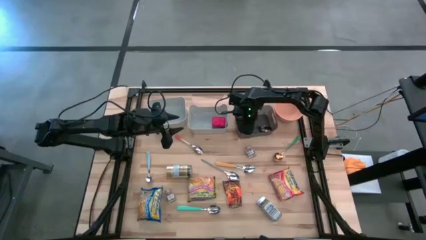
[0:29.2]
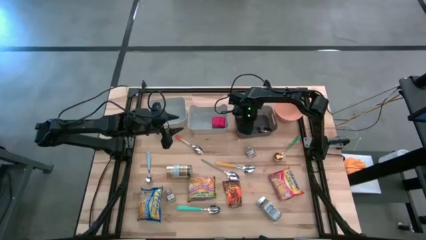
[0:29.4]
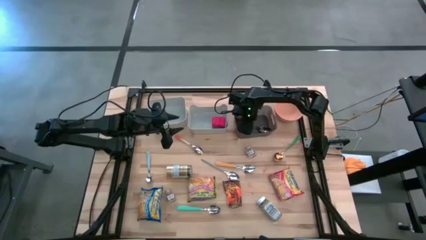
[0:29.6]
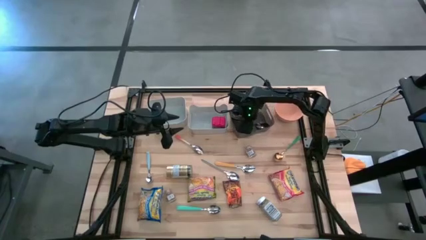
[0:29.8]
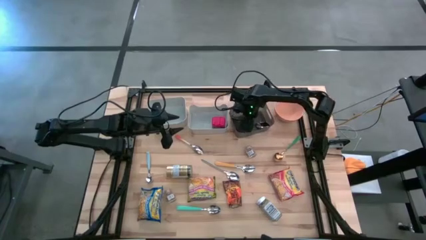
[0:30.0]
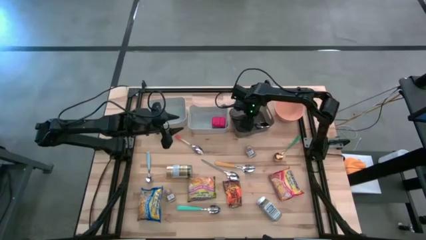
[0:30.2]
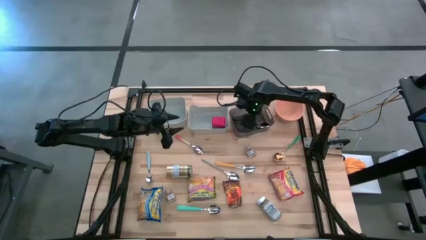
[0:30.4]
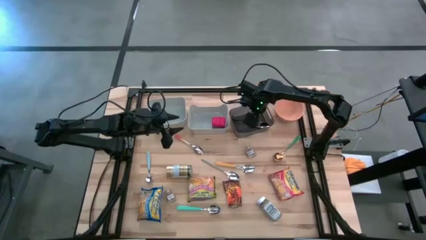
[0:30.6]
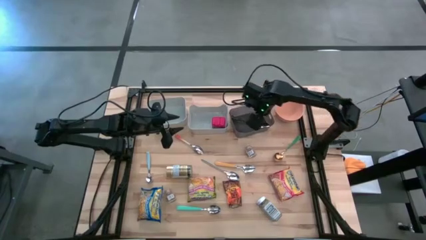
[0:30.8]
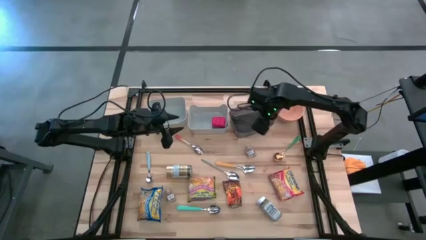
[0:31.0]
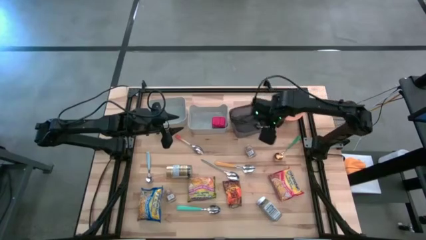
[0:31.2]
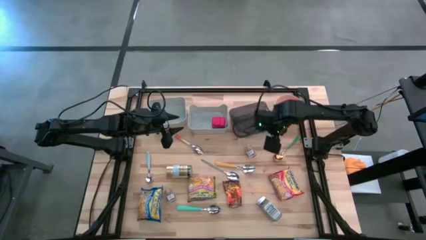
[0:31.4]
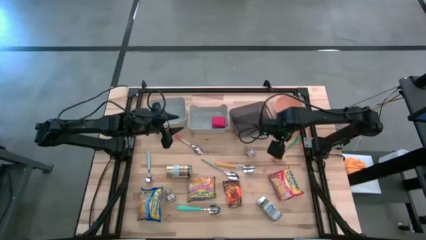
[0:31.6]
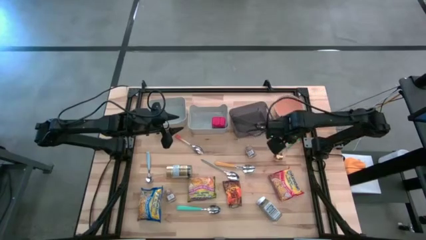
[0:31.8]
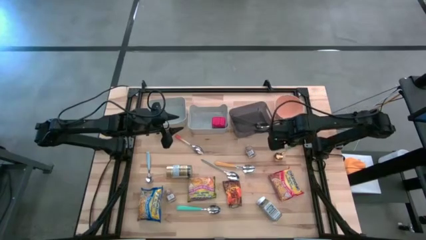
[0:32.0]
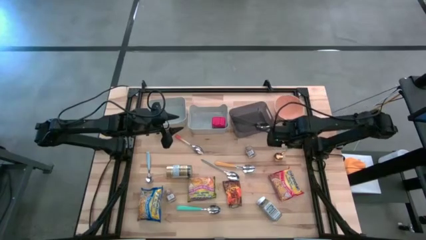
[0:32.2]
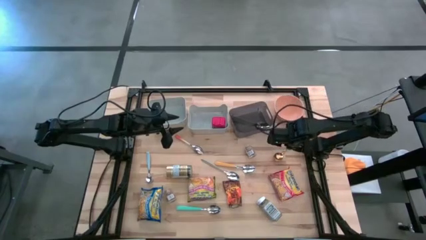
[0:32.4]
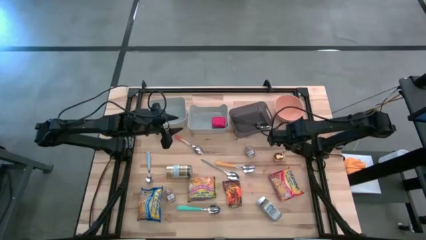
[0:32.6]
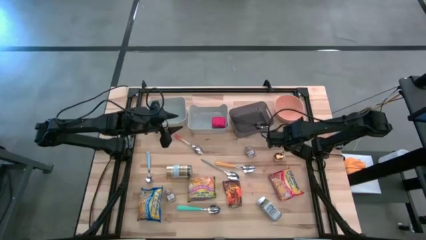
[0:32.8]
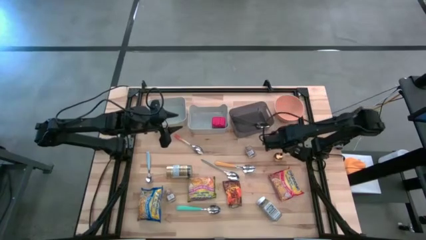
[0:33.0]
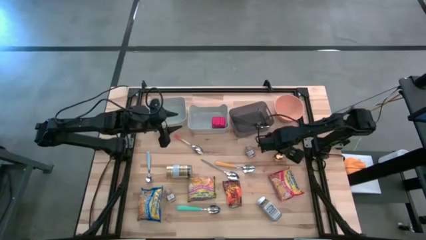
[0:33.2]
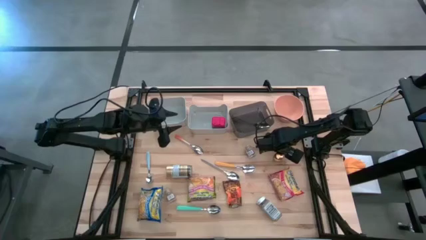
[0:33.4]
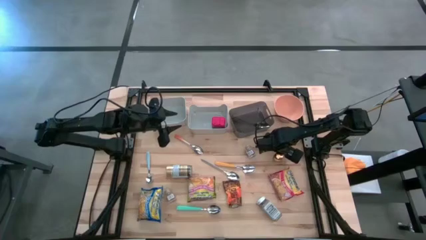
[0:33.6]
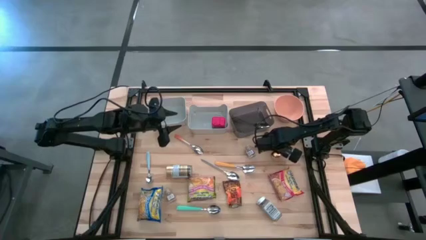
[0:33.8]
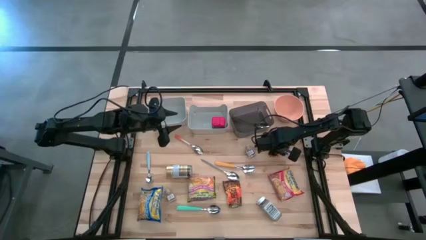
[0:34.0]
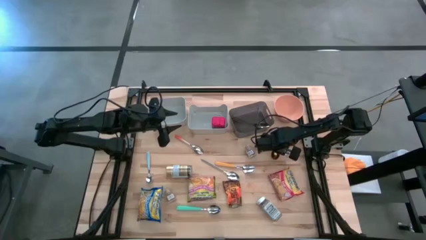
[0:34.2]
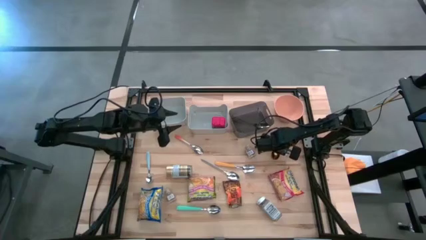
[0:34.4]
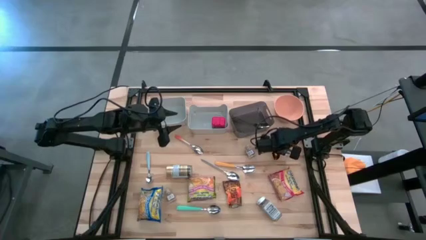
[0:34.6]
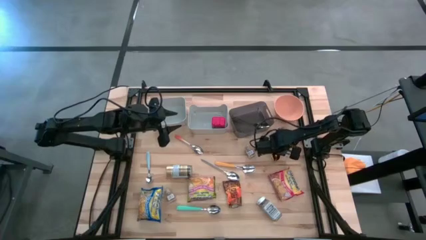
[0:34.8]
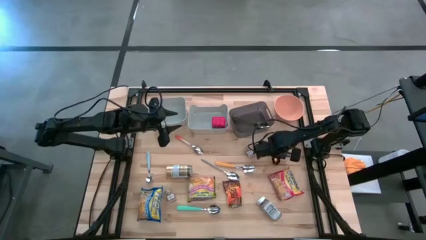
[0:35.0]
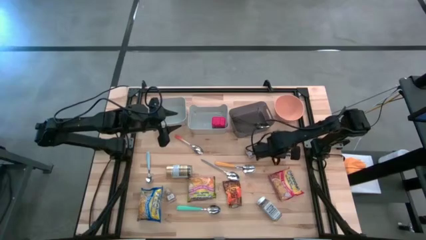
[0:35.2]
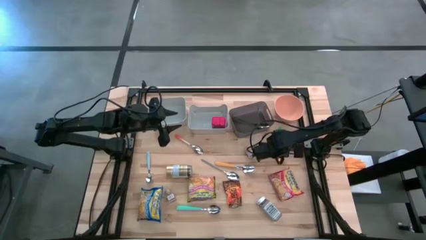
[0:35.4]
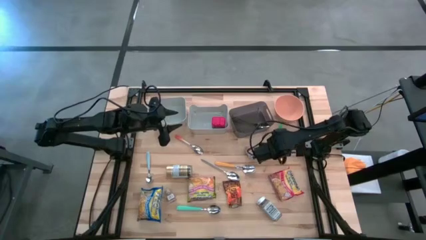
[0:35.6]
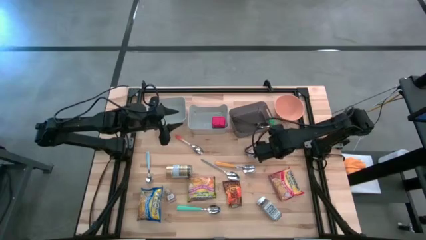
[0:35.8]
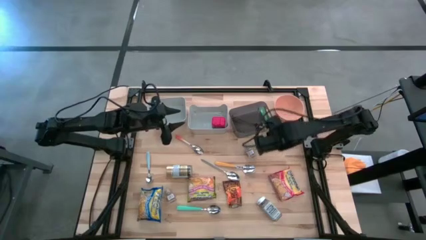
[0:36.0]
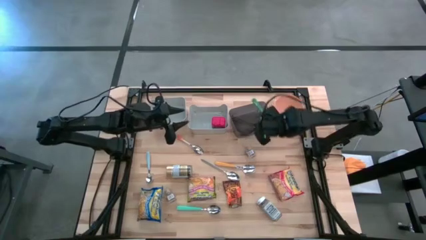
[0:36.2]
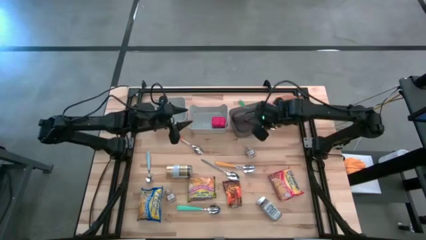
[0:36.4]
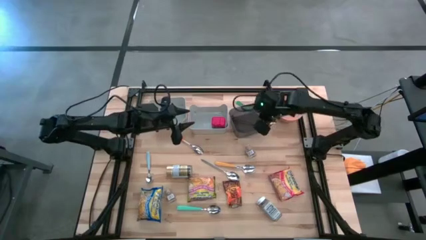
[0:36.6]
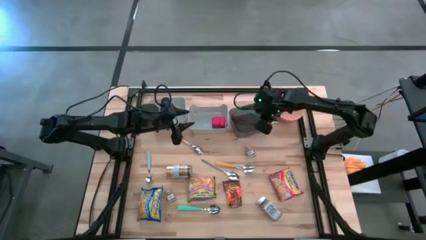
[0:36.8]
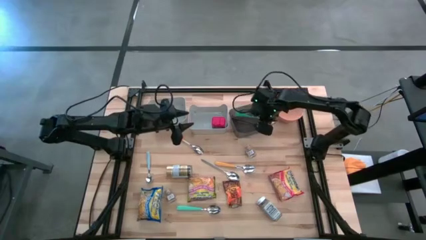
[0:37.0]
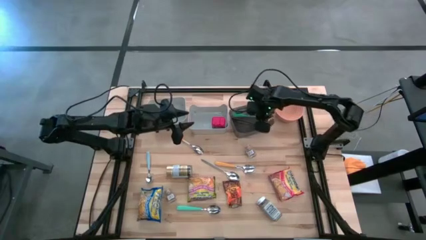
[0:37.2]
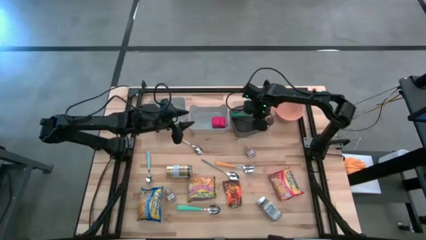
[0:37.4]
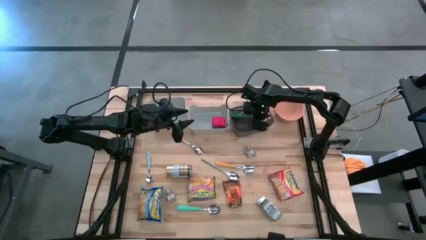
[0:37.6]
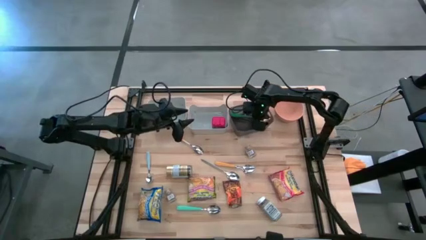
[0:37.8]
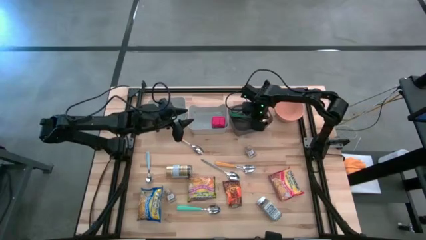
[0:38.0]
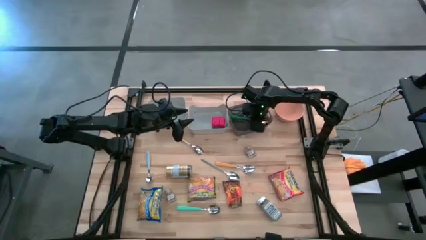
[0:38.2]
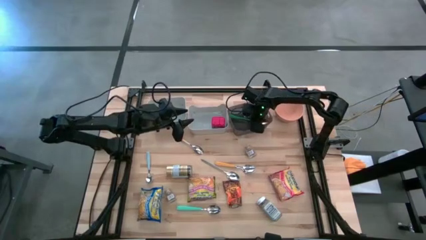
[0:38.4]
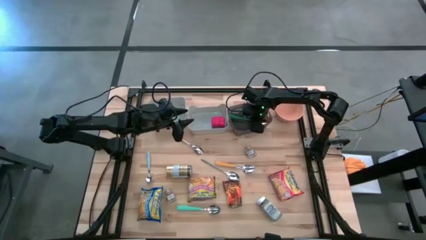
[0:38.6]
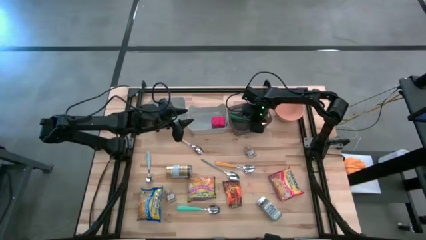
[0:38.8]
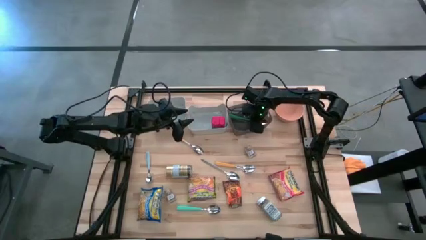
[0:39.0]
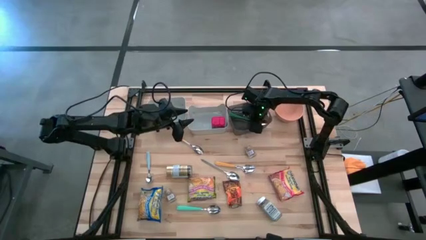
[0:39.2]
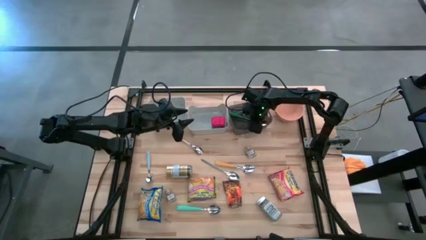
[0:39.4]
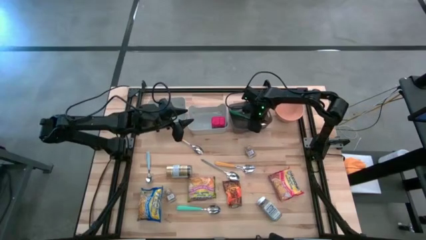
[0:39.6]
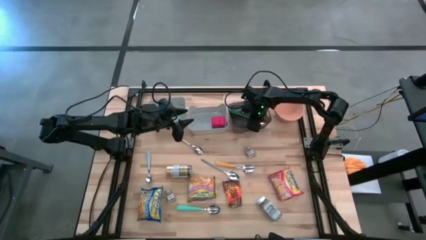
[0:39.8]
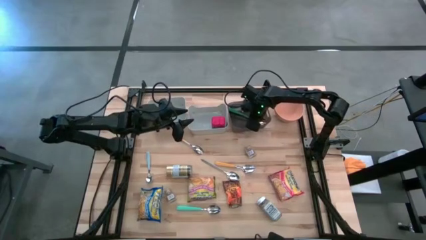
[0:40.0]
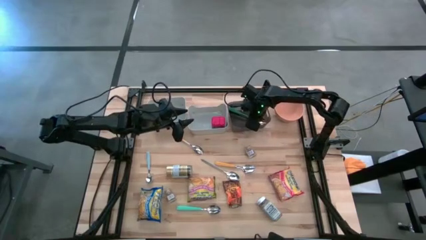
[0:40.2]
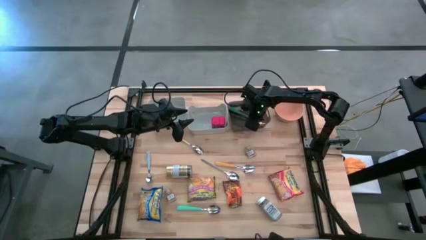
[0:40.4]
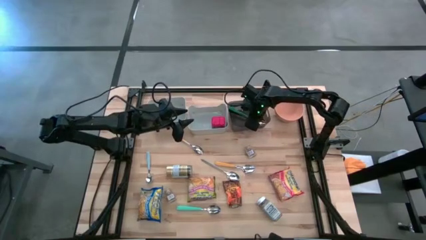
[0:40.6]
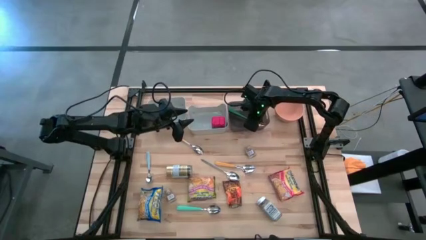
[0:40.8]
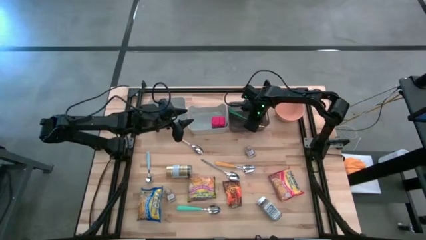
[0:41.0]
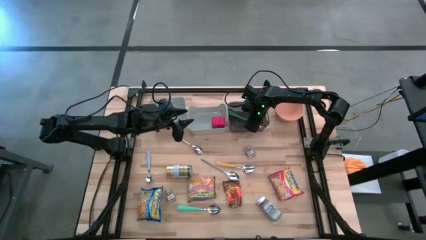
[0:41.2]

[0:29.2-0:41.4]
Put the green spoon into the black bin

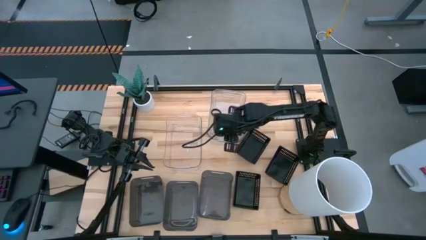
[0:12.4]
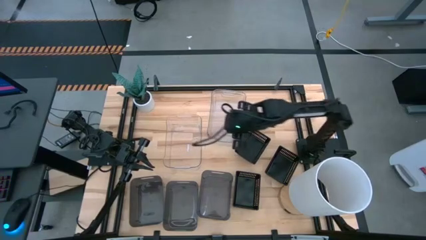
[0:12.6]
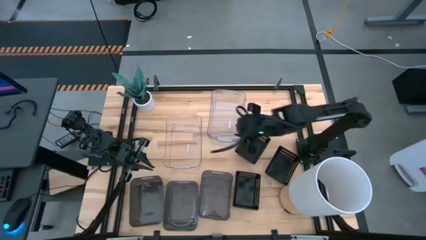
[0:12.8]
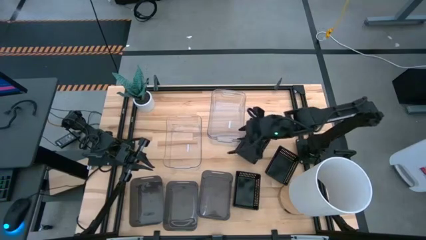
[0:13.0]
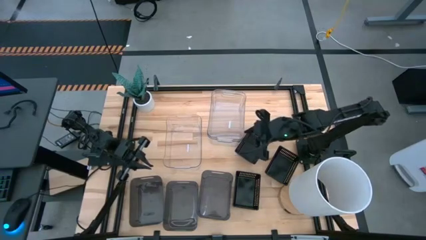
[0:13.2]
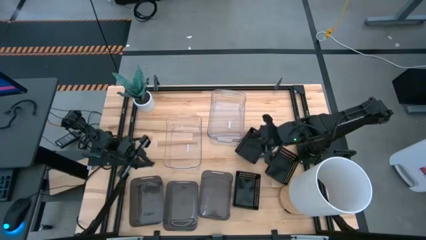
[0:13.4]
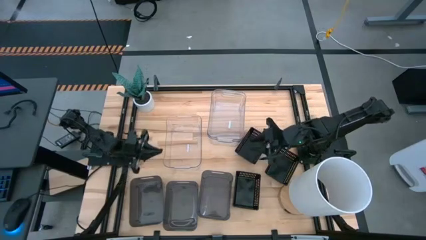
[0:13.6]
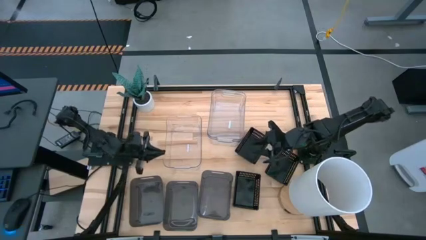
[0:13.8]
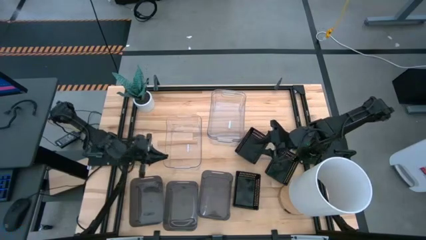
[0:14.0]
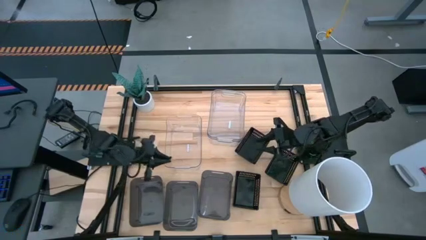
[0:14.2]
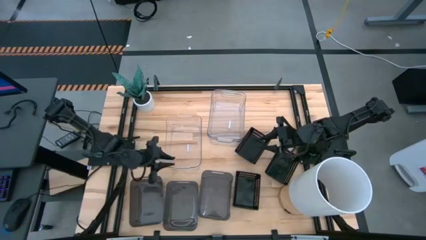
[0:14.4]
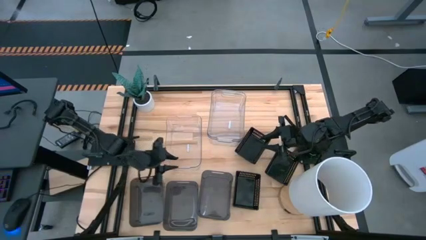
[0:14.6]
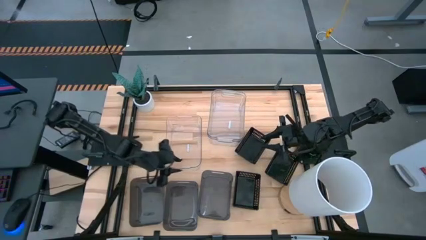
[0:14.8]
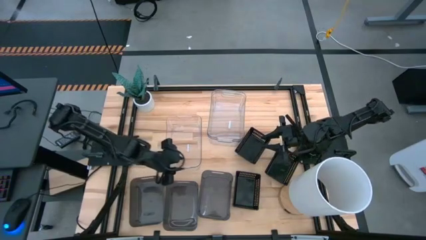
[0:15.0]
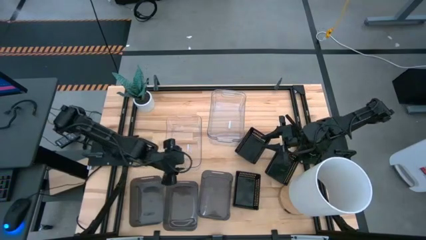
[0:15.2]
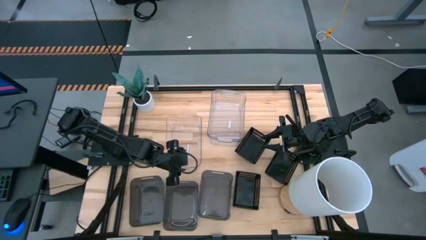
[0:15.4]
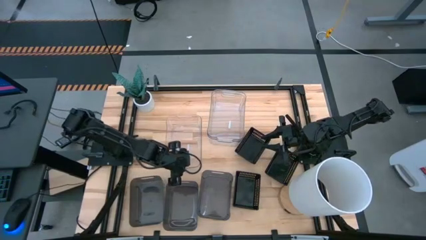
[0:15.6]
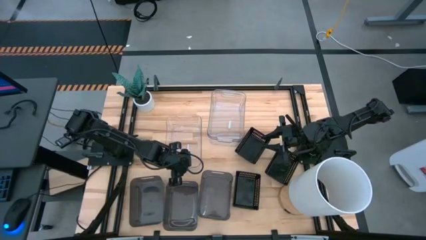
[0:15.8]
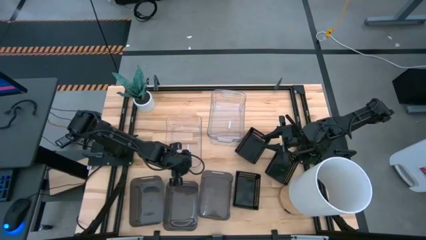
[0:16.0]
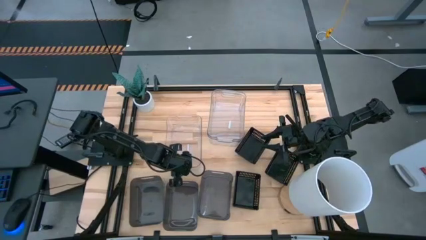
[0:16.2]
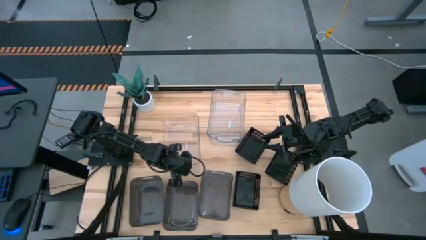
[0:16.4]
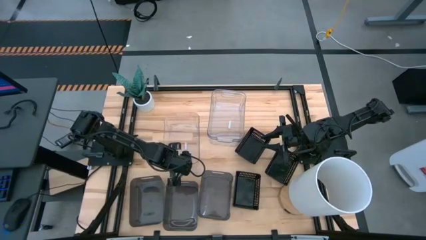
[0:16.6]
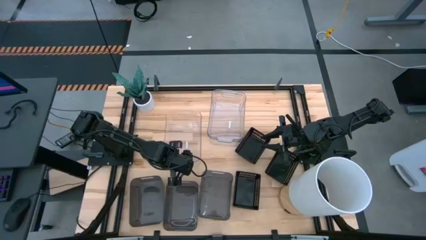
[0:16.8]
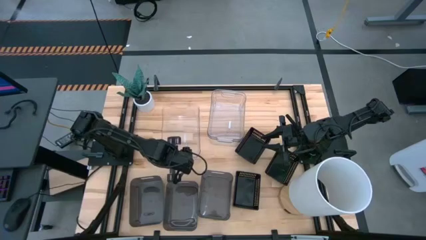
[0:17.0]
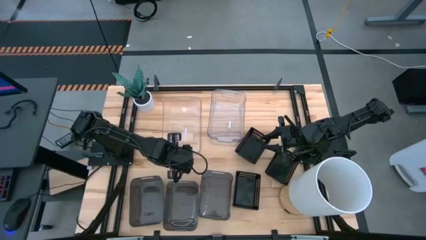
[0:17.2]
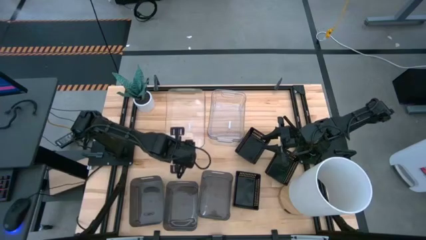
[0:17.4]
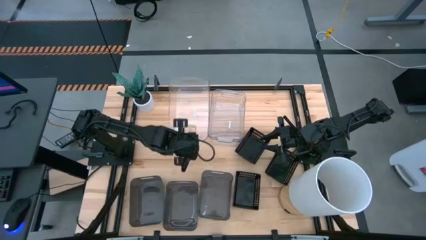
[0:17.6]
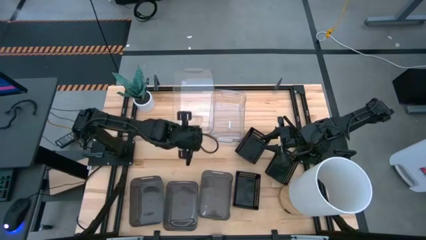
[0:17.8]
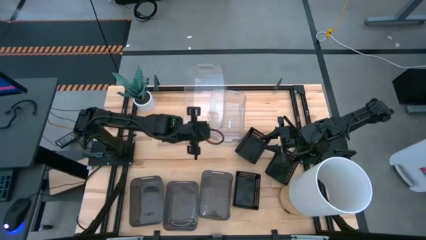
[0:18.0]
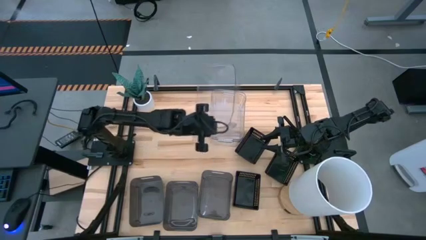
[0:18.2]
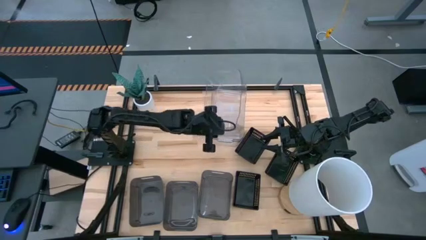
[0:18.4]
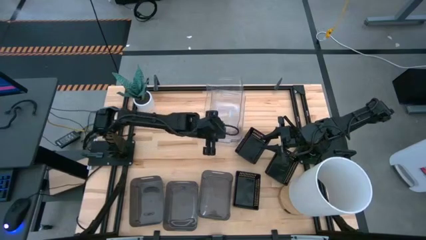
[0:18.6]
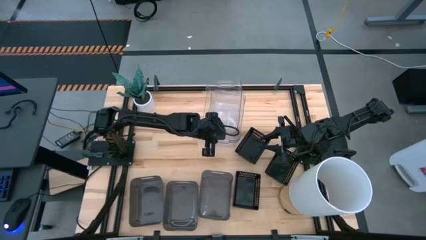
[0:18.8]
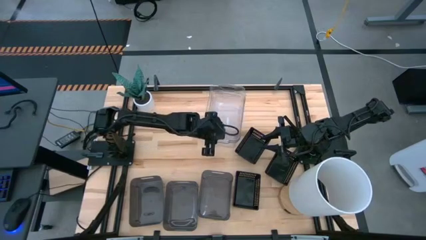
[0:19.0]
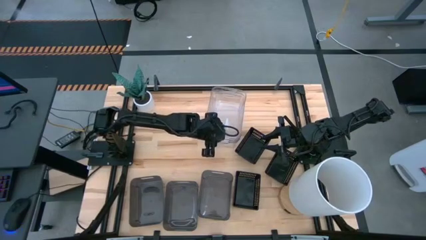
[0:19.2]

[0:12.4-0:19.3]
Stack the left transparent bin on top of the right transparent bin
